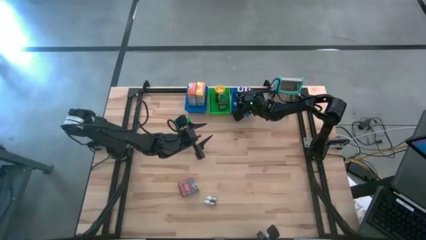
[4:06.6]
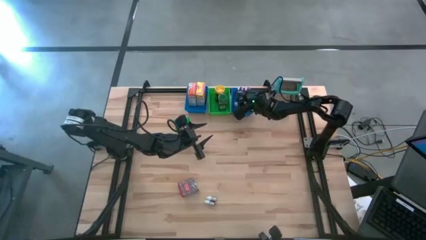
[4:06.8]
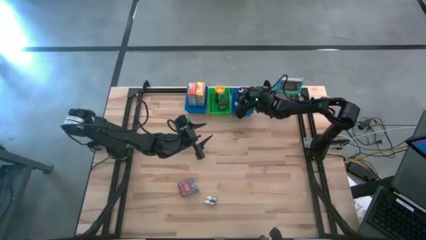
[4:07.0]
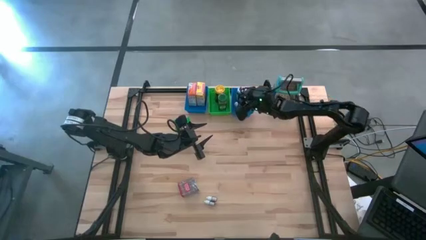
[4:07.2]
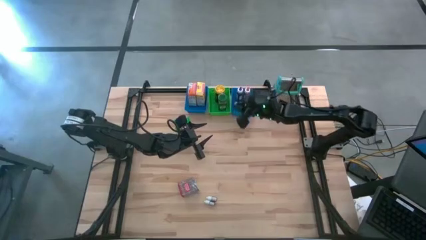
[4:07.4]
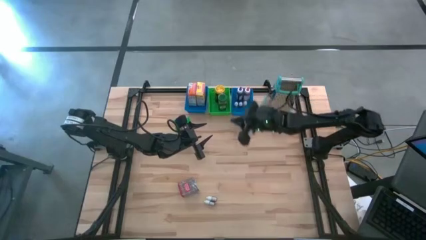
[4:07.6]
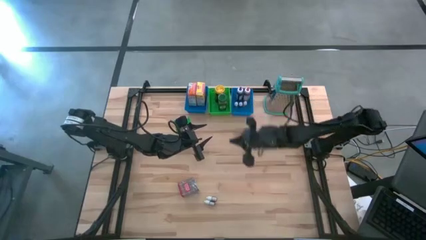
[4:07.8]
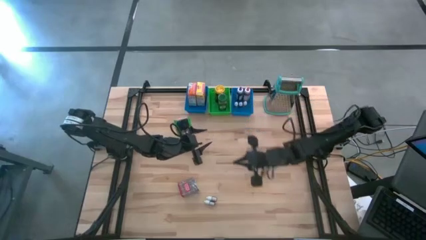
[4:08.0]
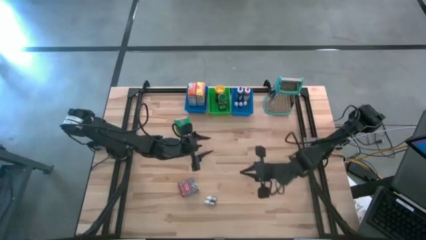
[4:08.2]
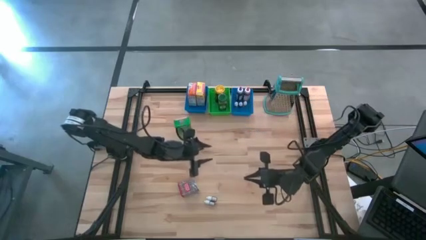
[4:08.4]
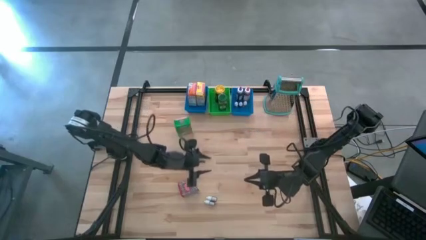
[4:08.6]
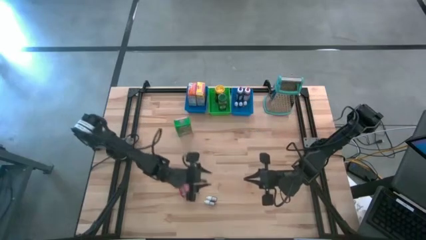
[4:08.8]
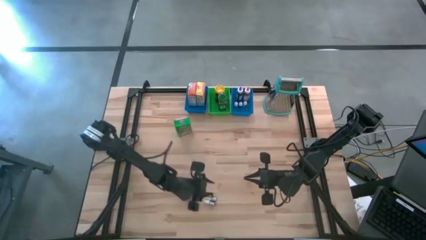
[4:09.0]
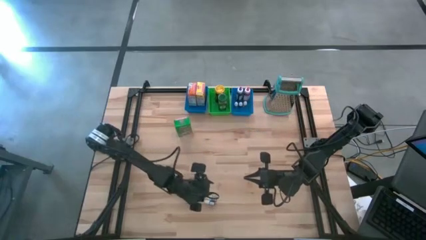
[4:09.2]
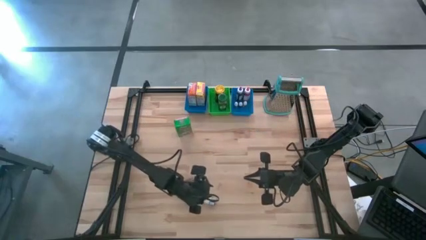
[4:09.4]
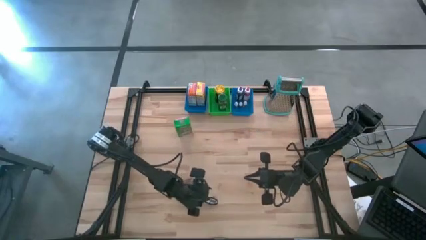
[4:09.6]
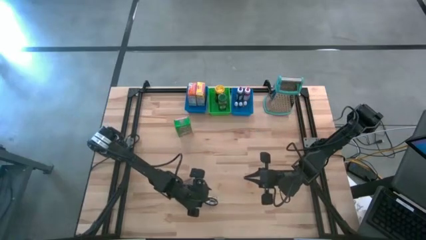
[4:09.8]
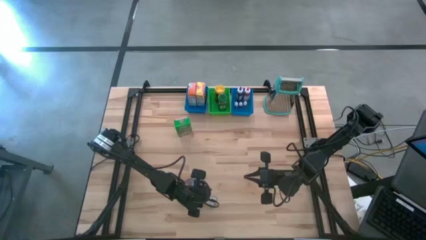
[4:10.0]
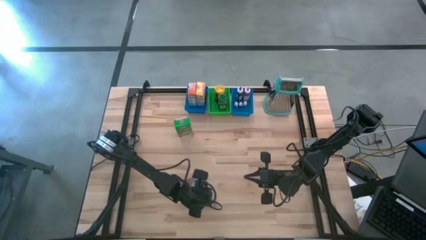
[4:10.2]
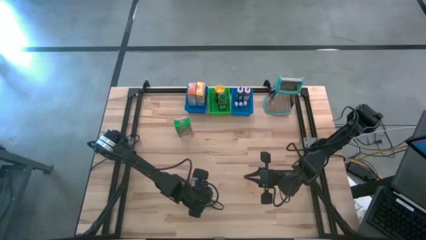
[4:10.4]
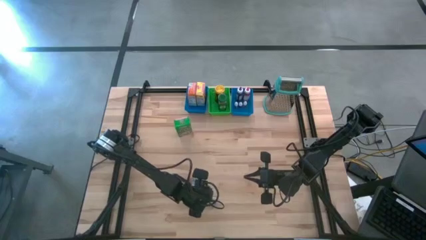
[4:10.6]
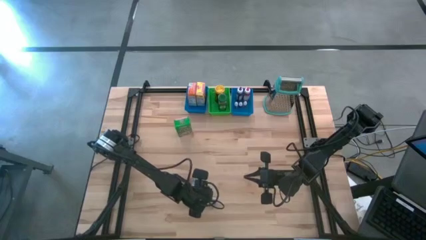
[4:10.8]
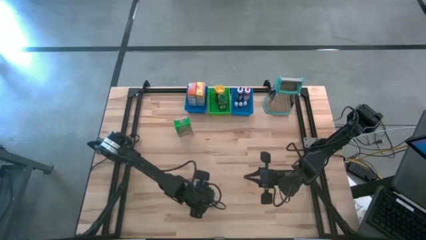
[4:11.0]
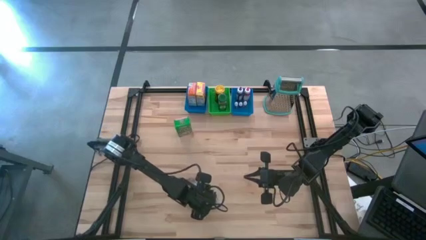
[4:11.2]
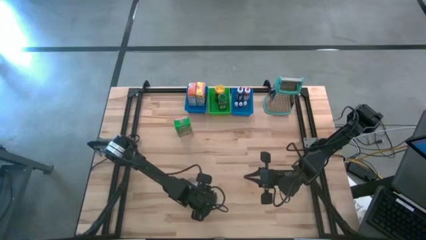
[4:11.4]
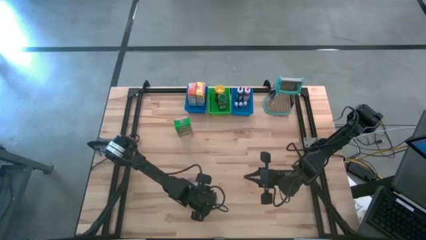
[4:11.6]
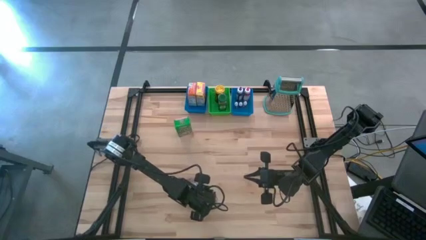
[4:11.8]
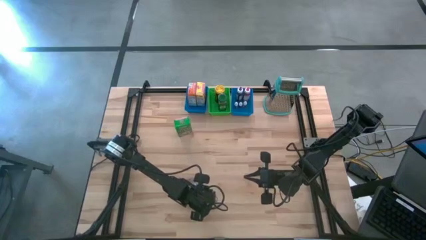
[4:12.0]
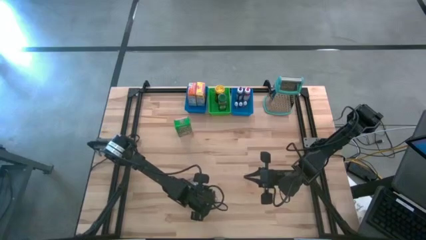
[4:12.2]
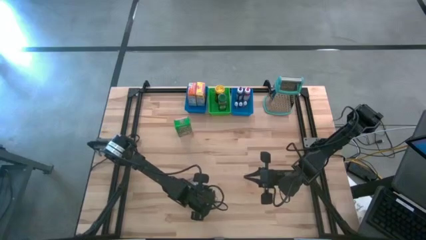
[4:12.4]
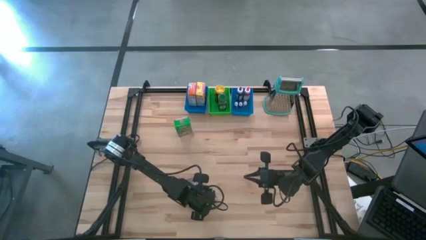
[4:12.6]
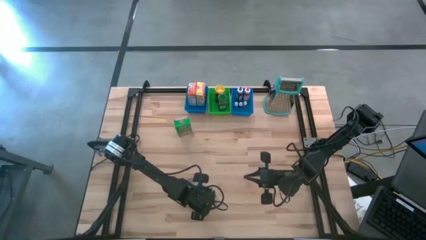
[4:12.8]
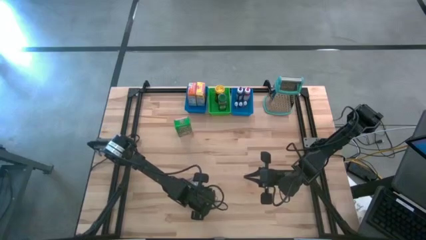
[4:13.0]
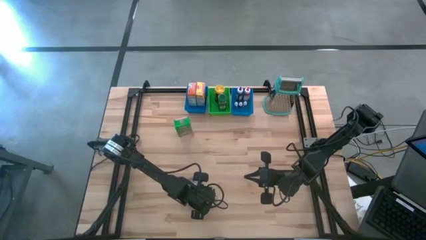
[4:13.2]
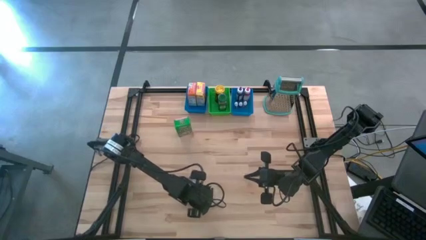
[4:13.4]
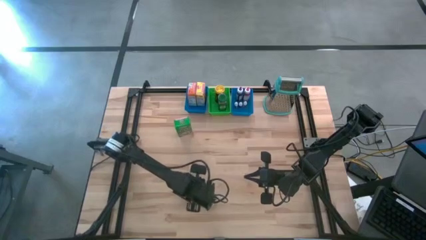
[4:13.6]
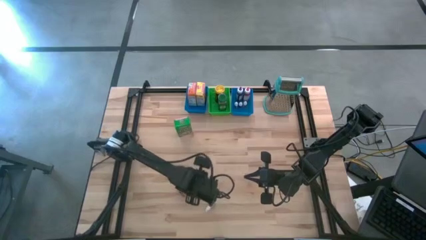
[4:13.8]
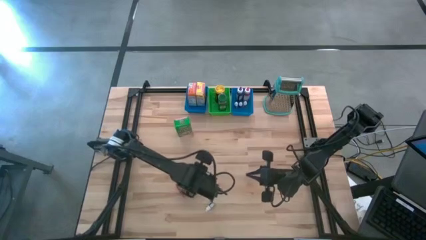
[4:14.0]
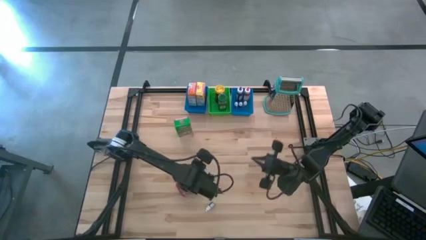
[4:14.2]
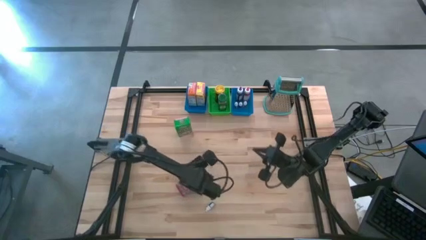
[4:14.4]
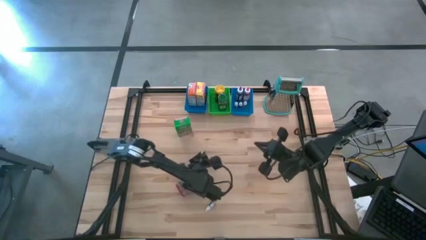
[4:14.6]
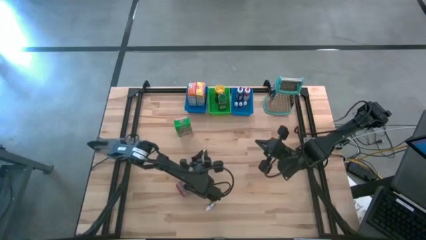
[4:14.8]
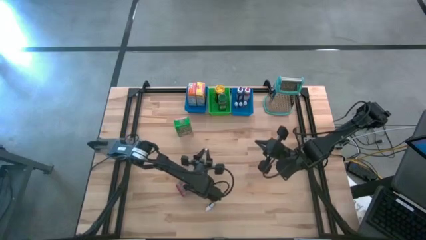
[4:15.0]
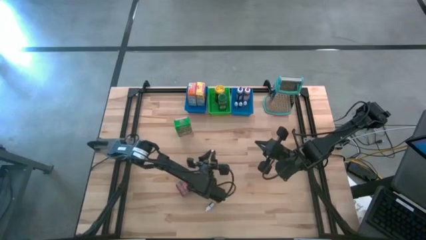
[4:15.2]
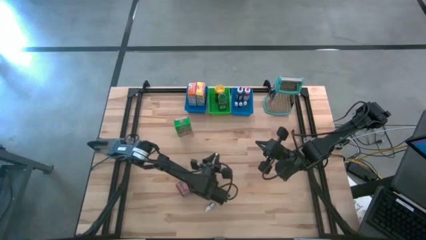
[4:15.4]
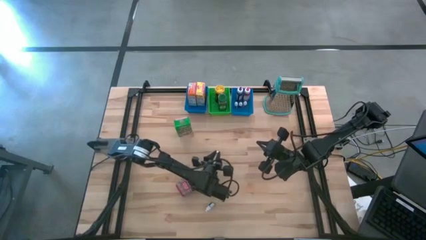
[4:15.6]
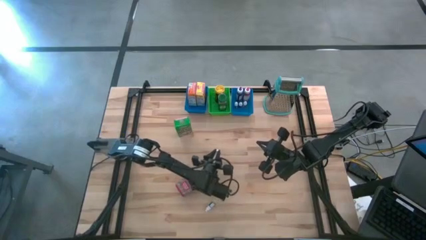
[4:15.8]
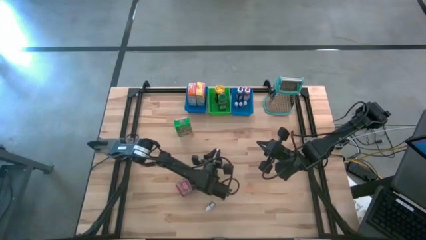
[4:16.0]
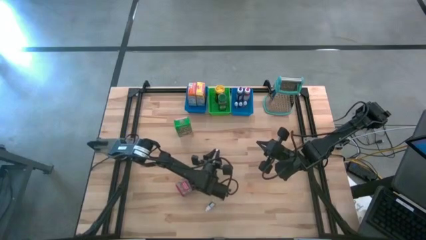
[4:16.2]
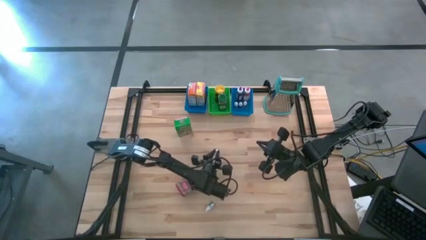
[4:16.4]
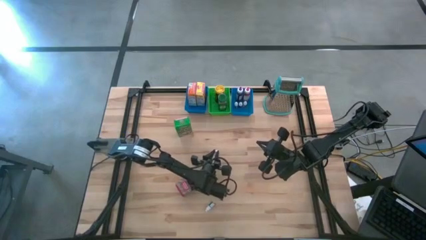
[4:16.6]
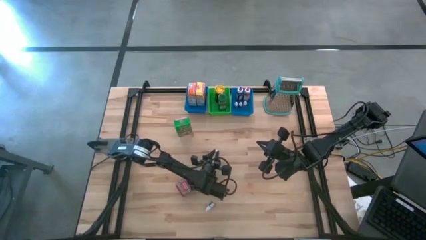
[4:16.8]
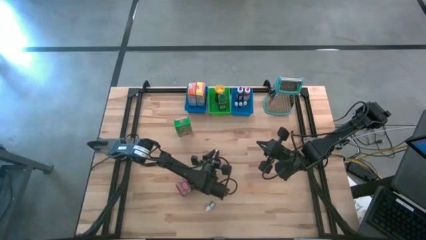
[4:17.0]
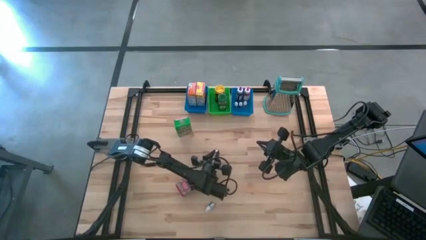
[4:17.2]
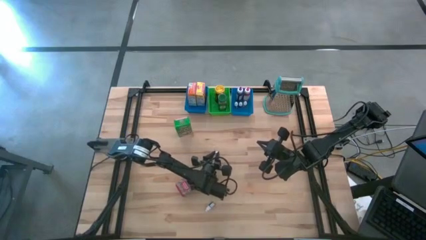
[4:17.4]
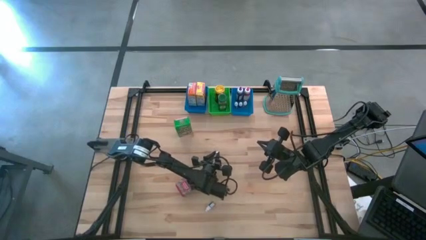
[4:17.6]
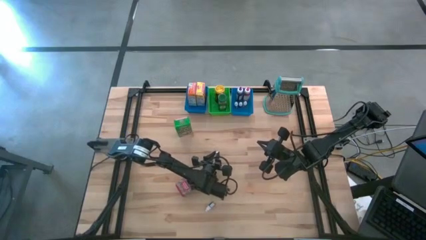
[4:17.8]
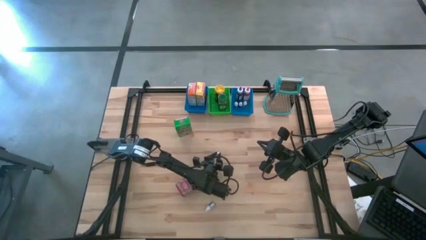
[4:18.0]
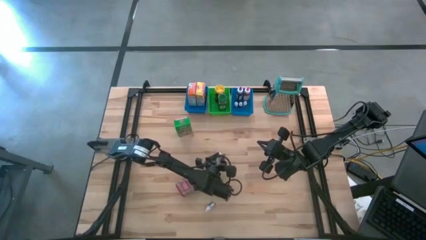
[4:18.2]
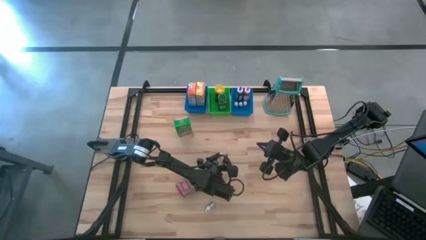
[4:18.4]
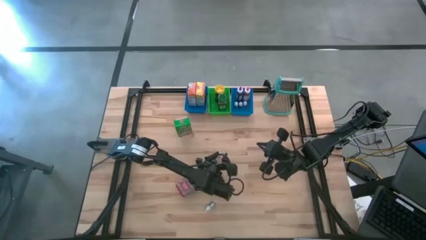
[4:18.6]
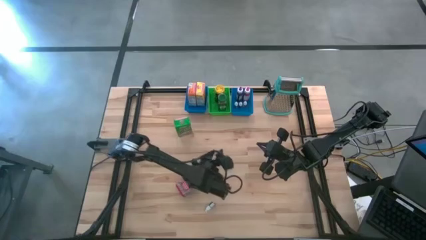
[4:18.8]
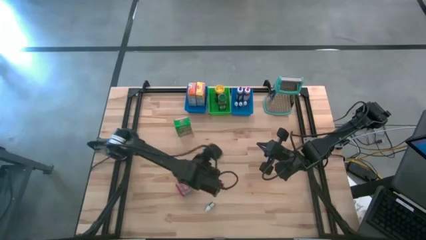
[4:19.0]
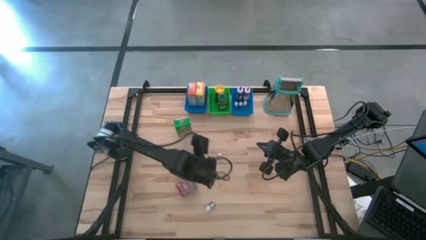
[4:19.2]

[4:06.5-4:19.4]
Task: Pick & Place Kitchen Items
Put the small red food coloring bottle into the right blue bin

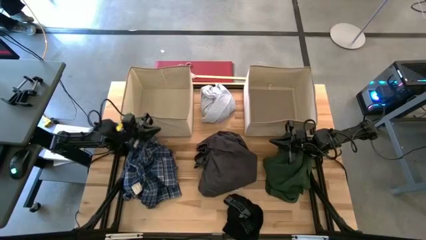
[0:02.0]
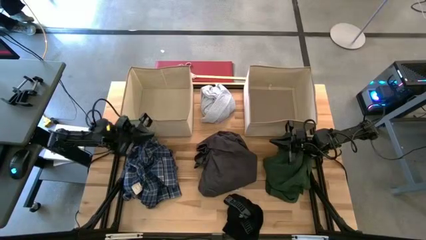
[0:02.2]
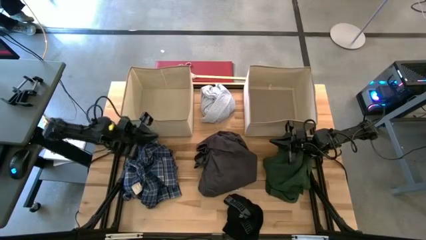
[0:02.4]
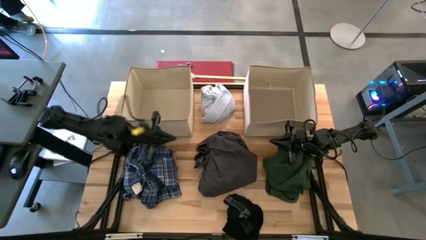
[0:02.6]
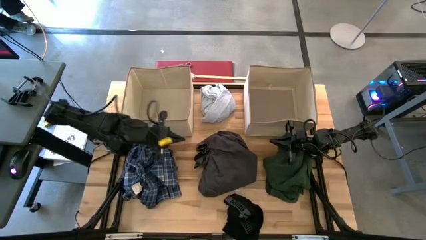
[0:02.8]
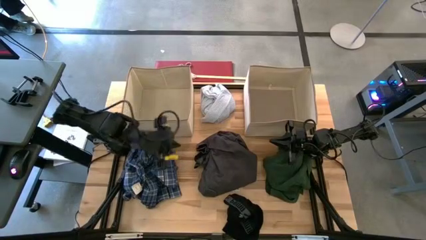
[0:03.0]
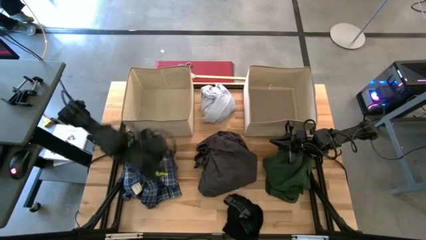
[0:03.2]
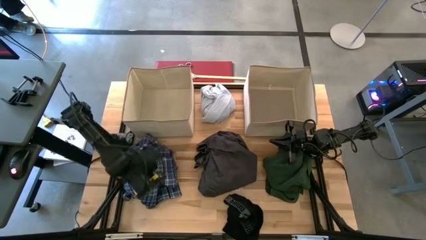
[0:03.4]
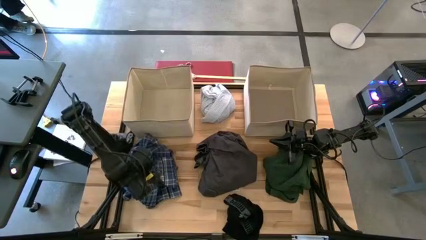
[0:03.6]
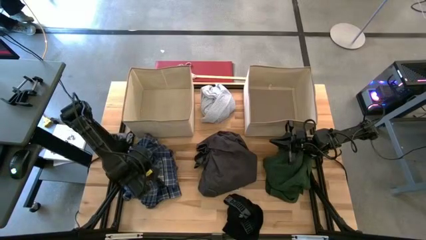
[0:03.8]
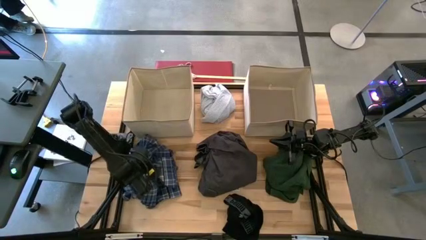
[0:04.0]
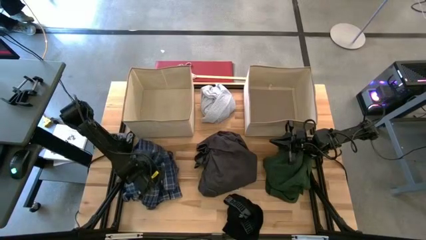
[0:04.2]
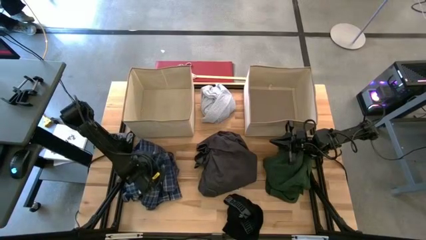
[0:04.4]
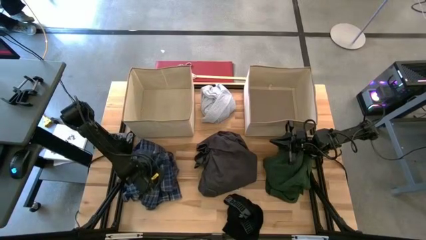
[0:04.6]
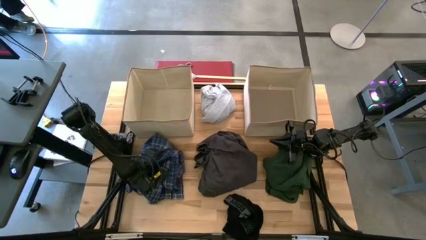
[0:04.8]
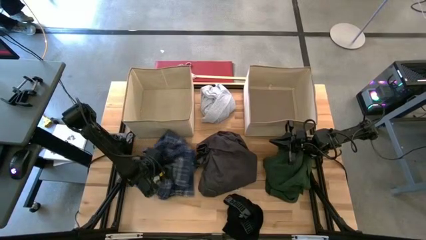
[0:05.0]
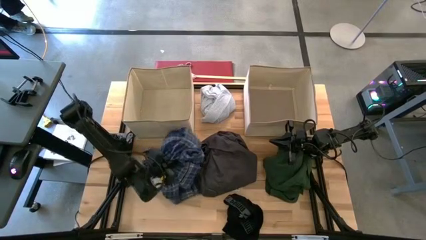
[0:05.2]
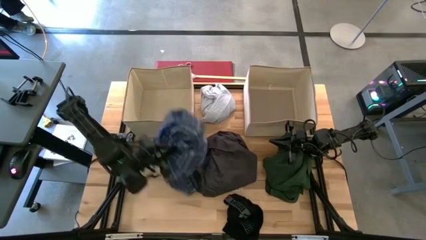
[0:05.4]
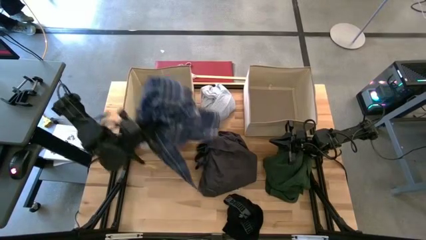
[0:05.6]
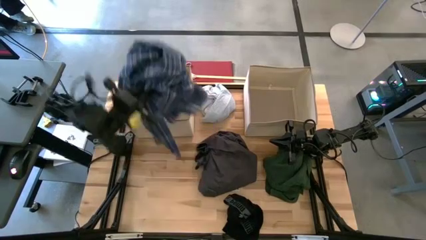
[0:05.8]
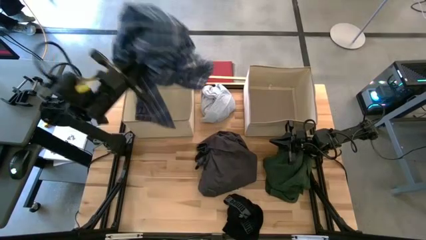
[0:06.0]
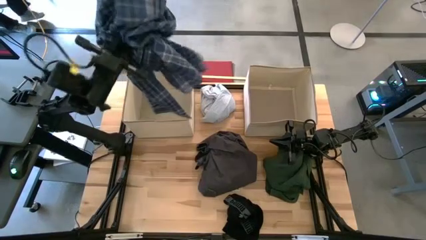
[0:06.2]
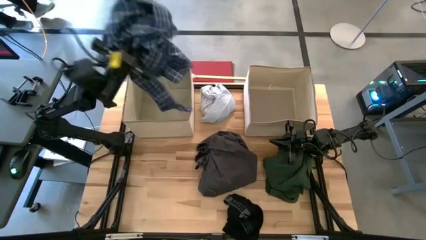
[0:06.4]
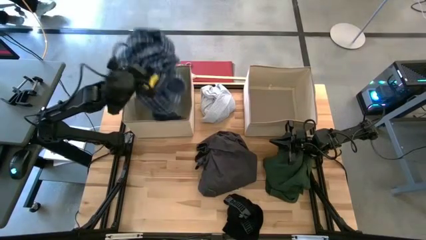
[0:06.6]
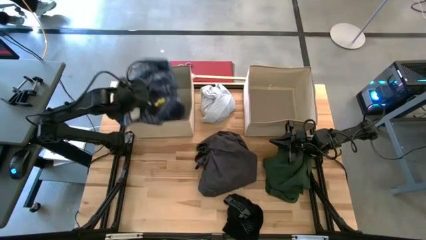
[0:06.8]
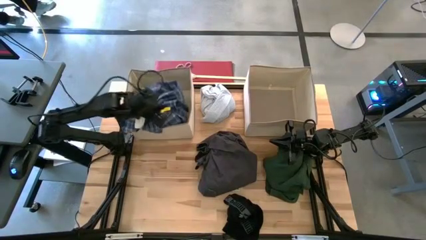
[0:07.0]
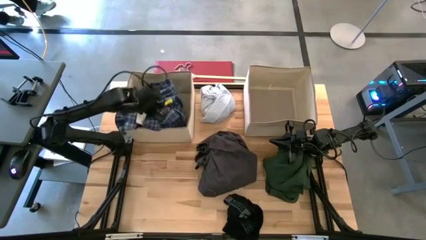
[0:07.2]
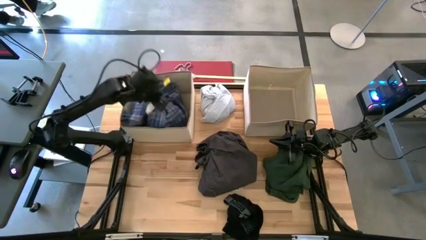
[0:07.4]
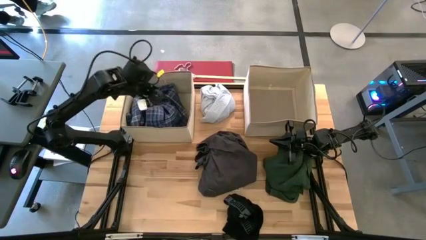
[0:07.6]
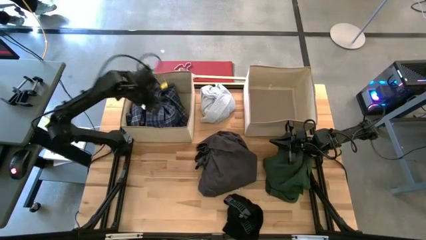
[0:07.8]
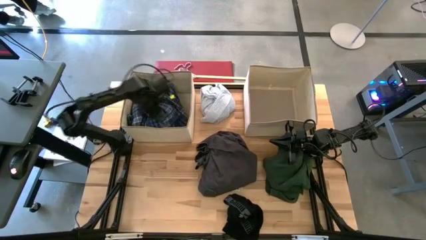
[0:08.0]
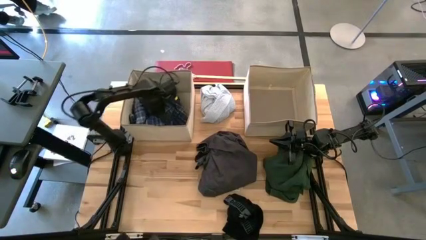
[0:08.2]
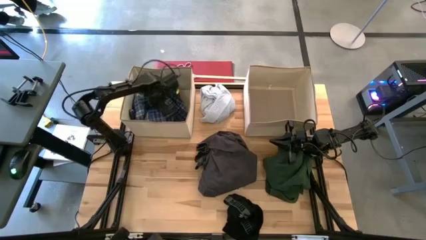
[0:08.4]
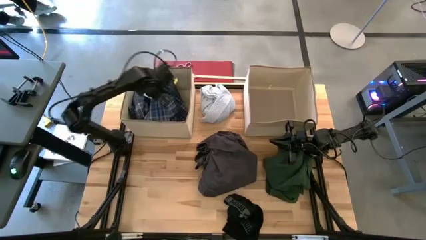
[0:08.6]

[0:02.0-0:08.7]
Task: Sort clothes
Put the blue shirt into the left laundry organizer
